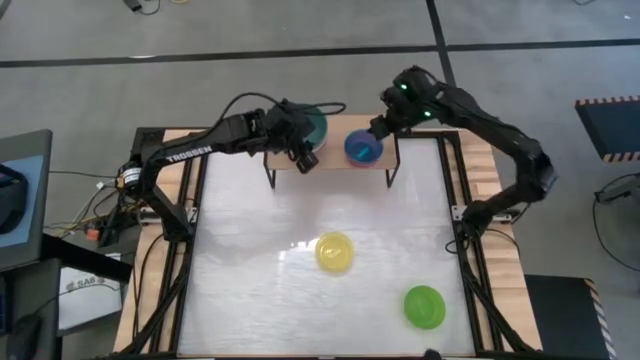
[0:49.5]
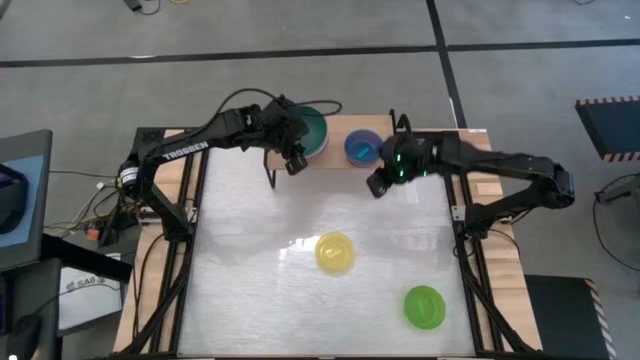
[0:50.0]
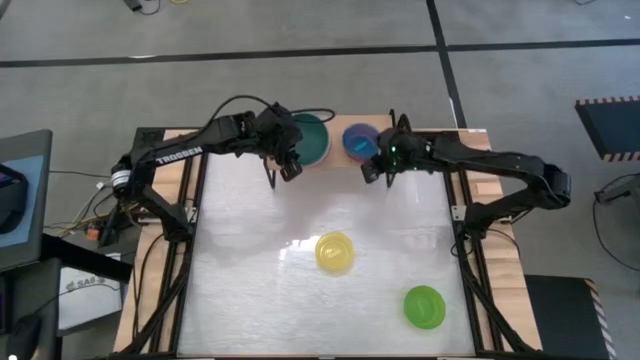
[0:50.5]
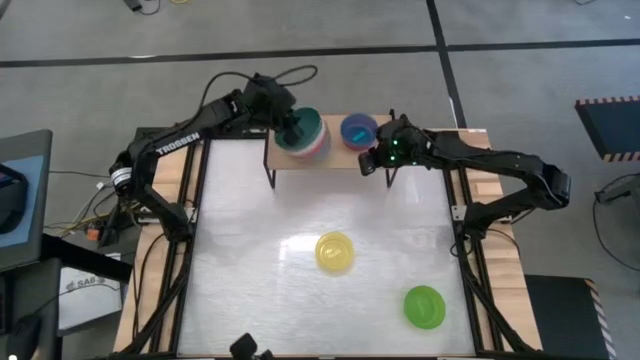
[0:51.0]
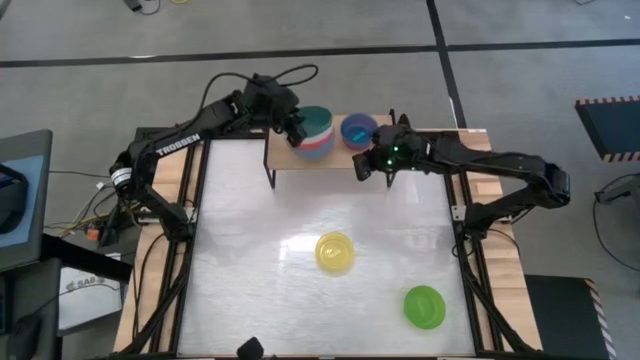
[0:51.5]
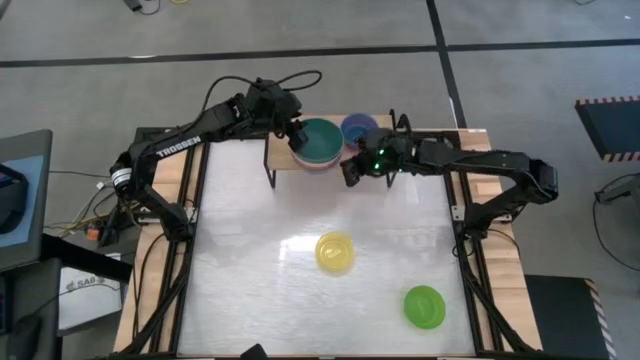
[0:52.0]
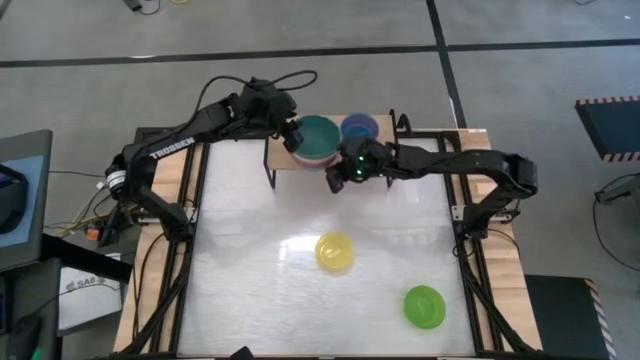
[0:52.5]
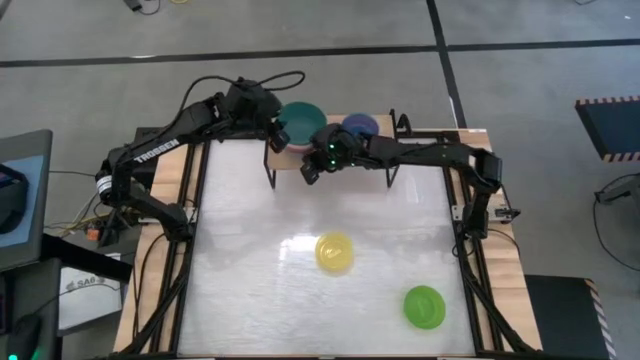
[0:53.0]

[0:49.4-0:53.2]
Task: Place and stack bowls onto a shelf
Adjust the stacked bowls on the shelf

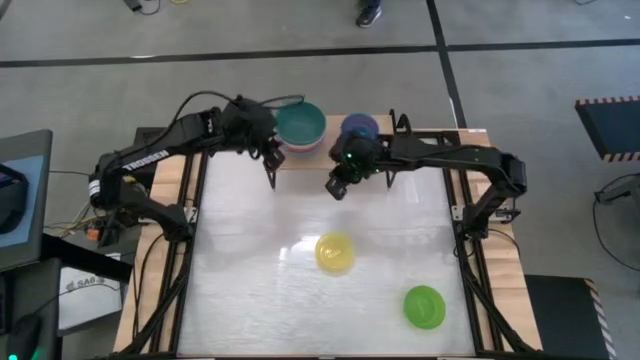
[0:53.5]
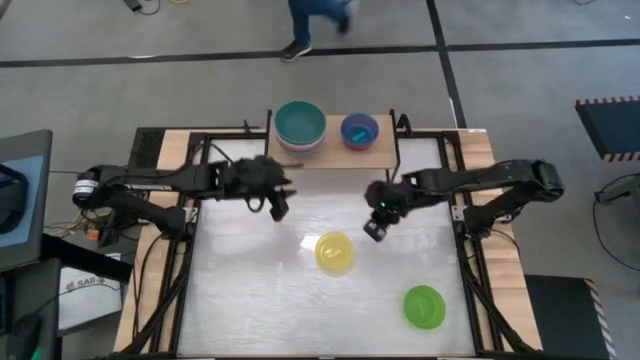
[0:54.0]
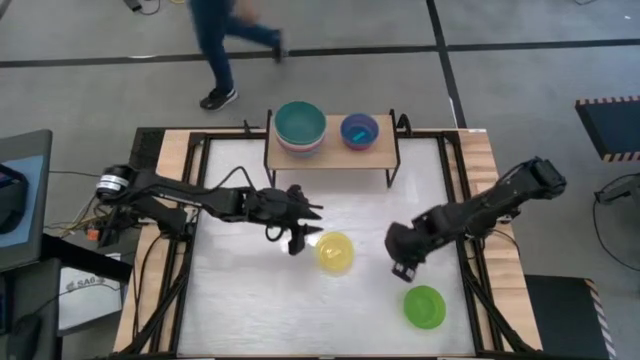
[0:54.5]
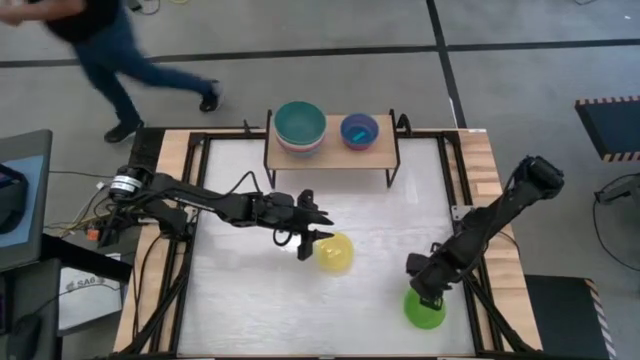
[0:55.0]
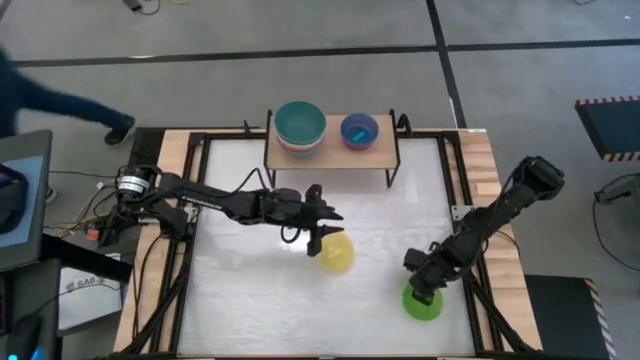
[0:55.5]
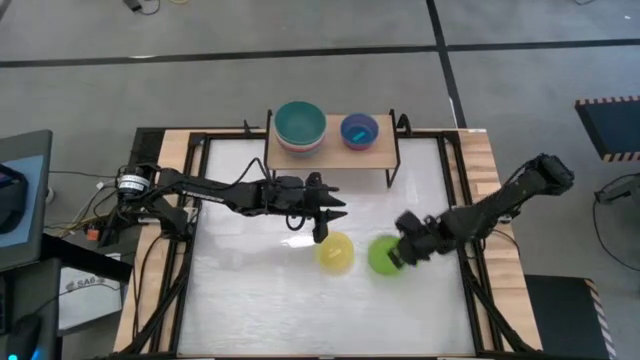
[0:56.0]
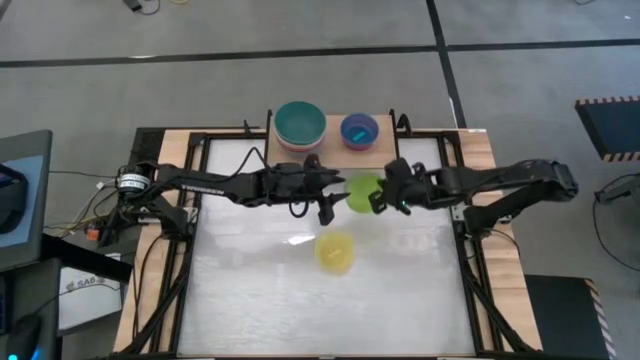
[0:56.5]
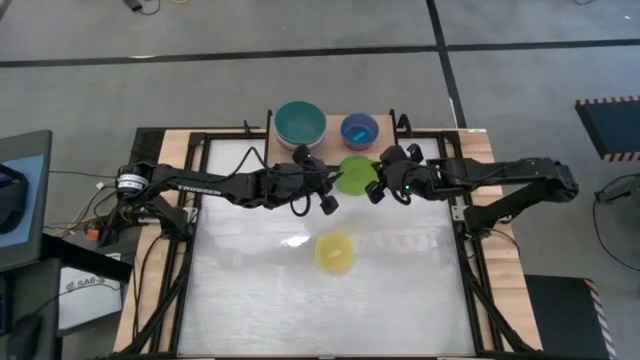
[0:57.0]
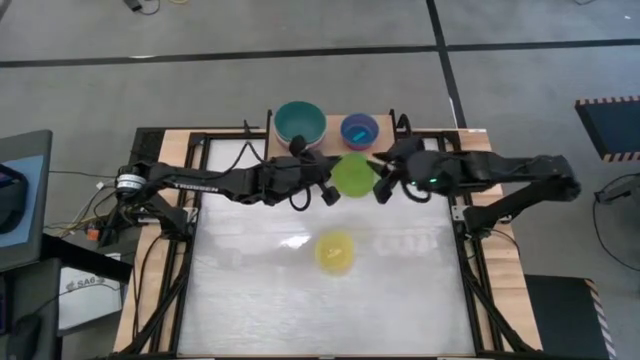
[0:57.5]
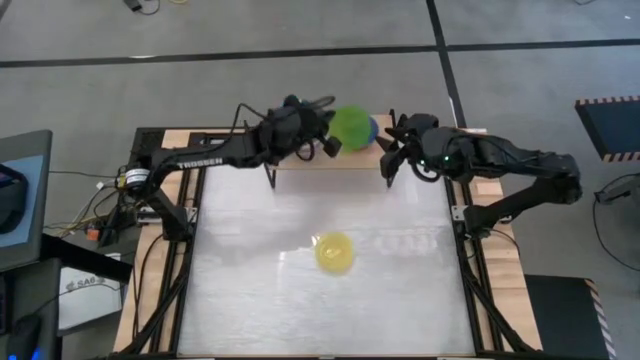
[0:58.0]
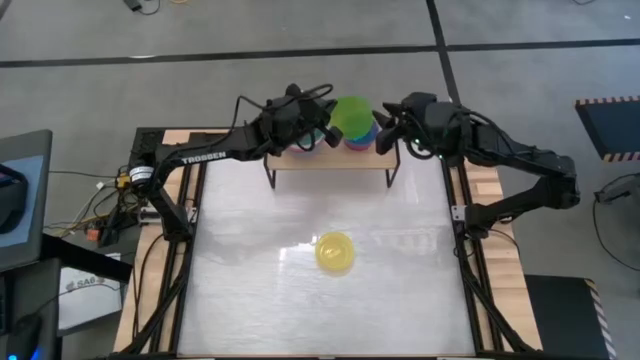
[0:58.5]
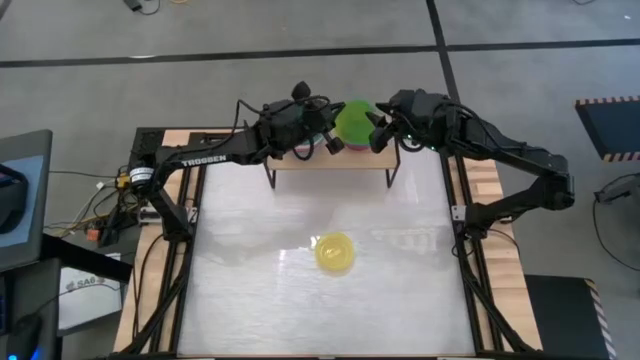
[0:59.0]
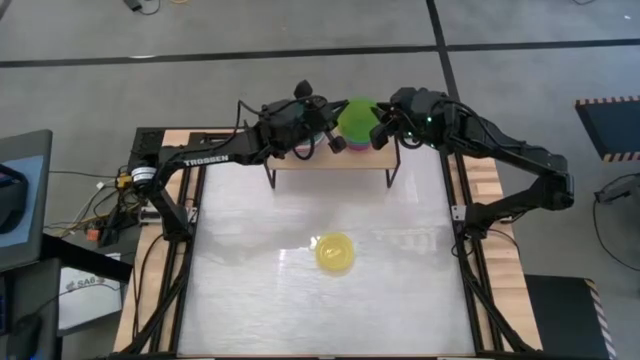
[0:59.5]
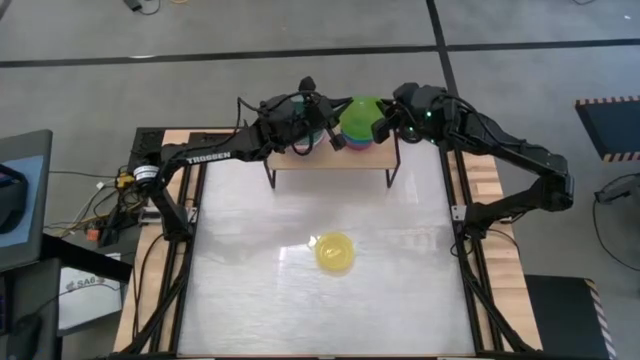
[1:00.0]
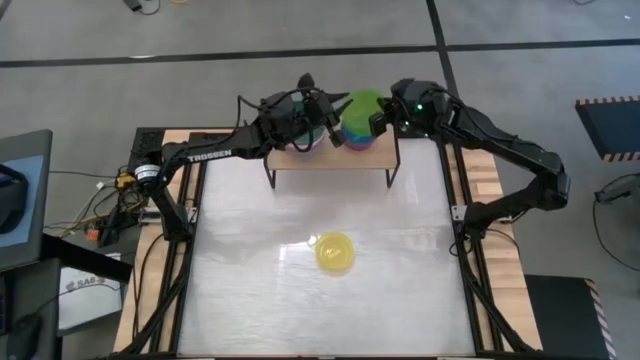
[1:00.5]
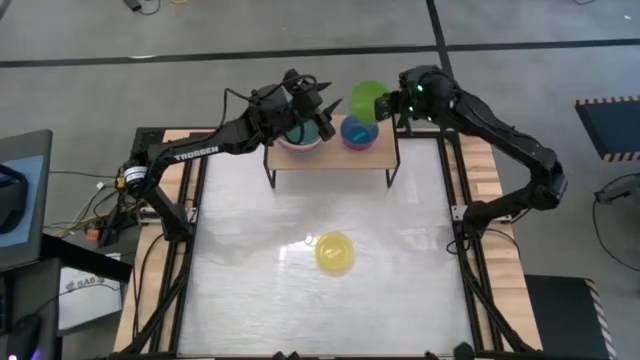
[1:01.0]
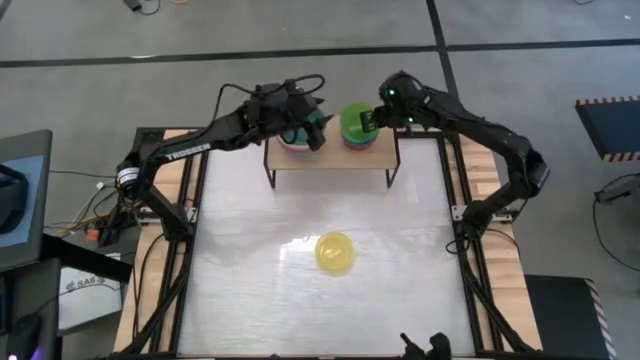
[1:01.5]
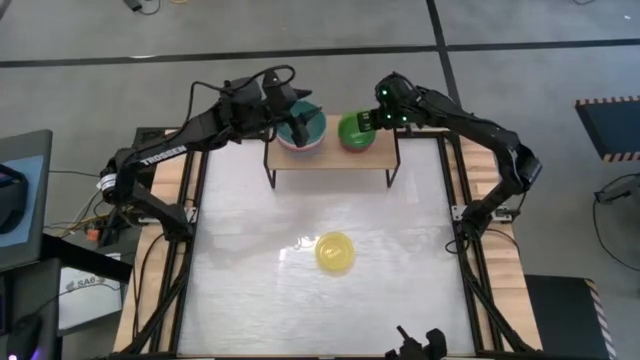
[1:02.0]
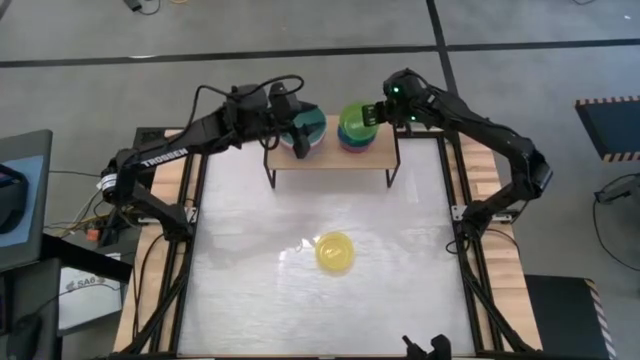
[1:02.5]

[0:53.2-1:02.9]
Stack the green bowl on top of the light blue bowl on the shelf

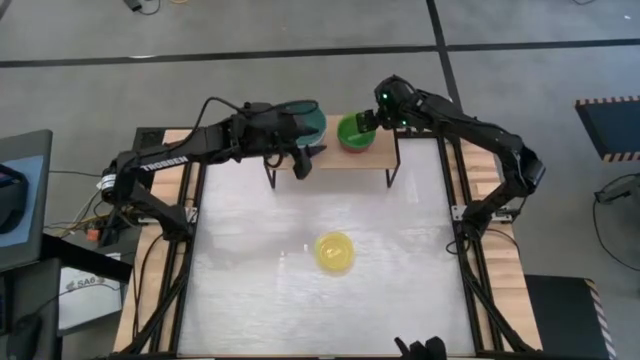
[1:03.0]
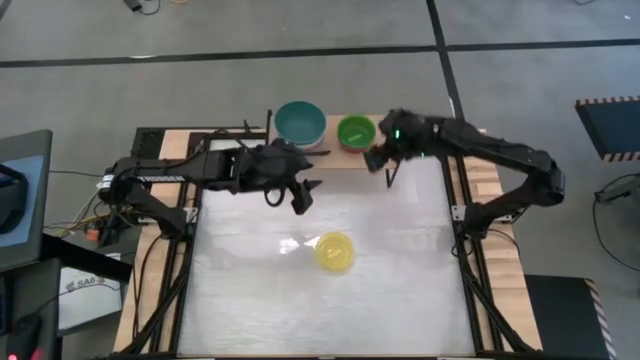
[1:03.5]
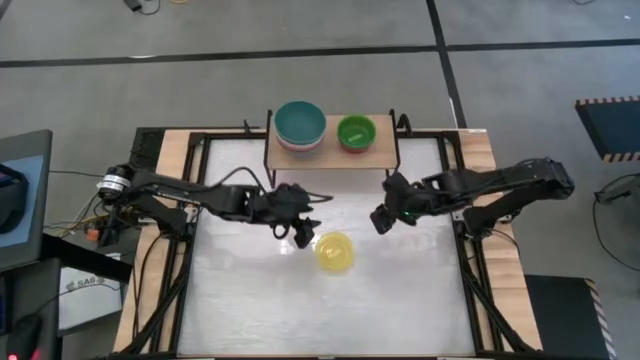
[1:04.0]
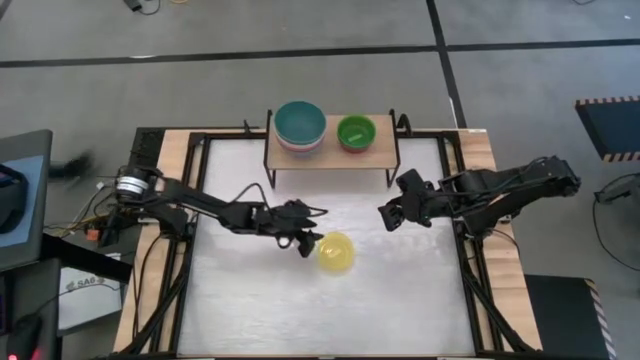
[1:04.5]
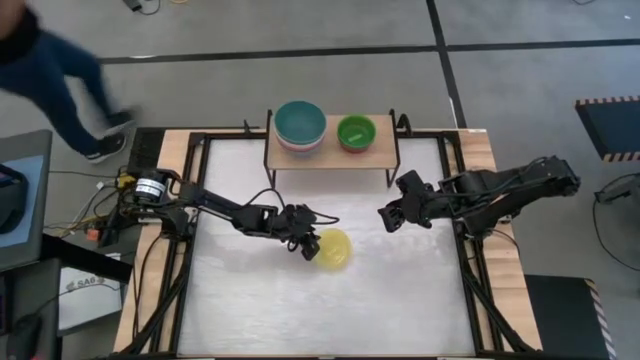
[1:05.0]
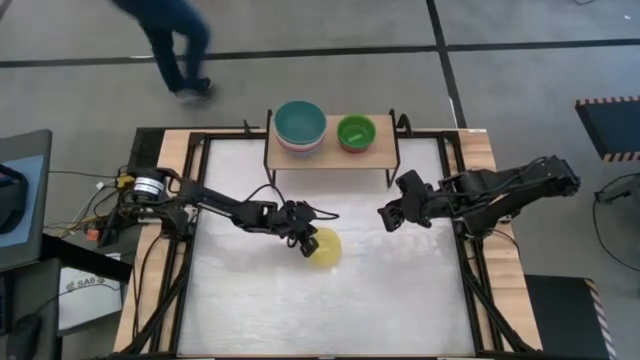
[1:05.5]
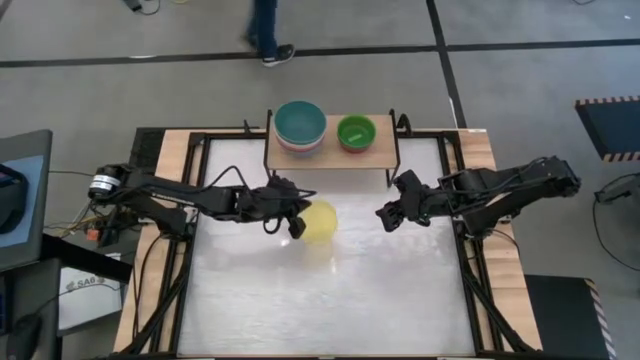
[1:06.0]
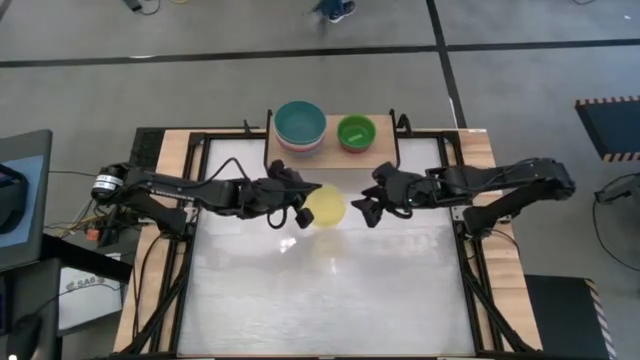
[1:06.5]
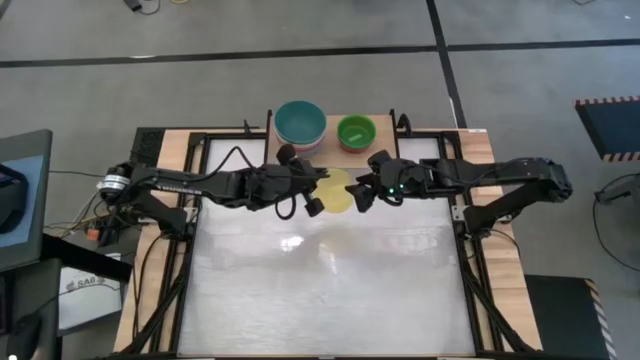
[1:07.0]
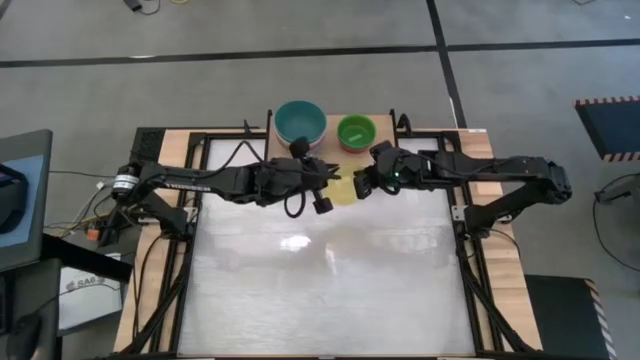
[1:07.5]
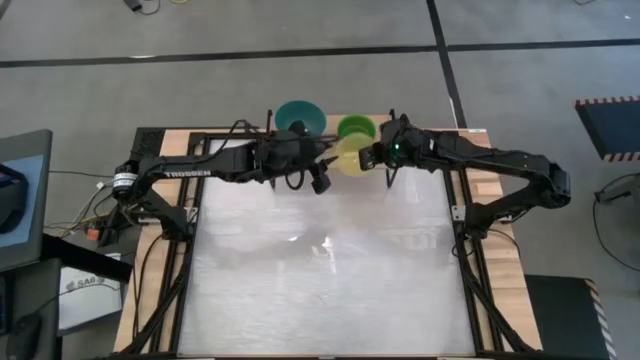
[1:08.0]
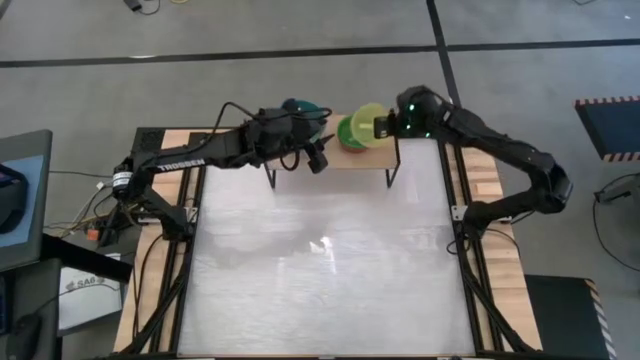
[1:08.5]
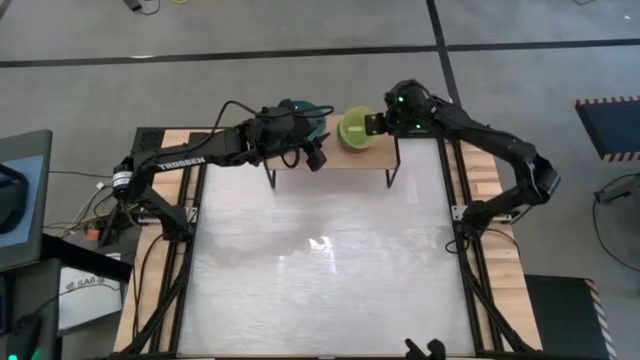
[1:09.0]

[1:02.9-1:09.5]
Stack the yellow bowl on top of the green bowl on the shelf

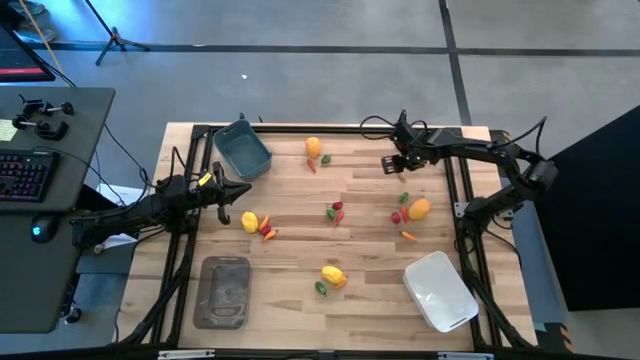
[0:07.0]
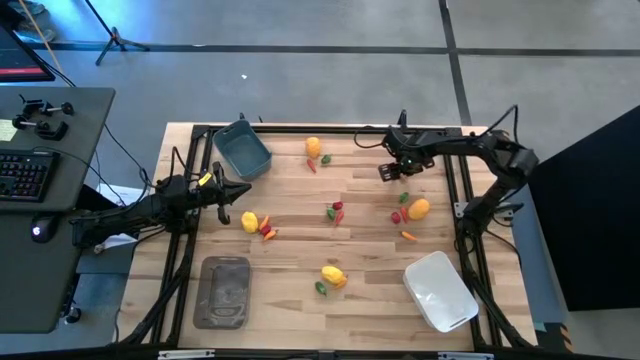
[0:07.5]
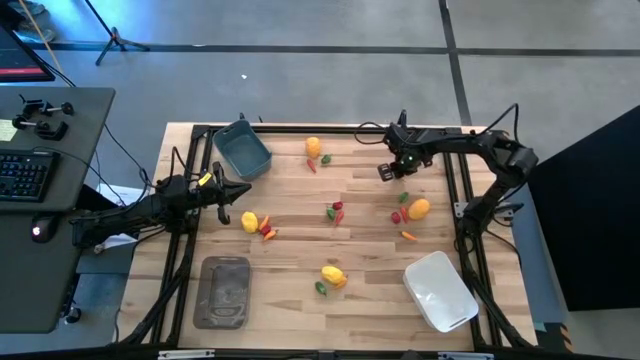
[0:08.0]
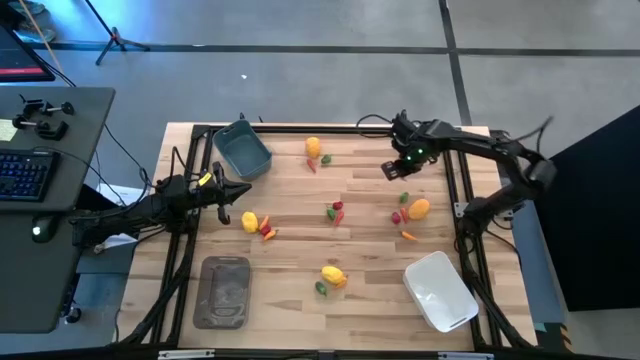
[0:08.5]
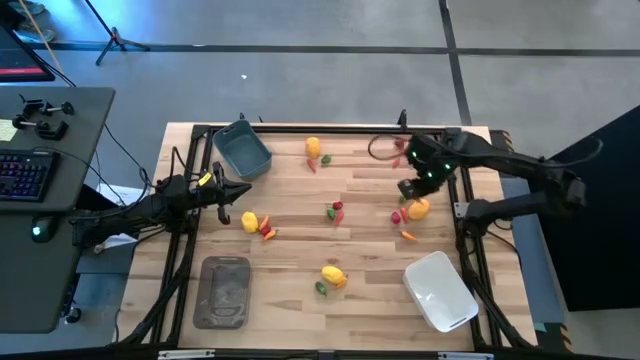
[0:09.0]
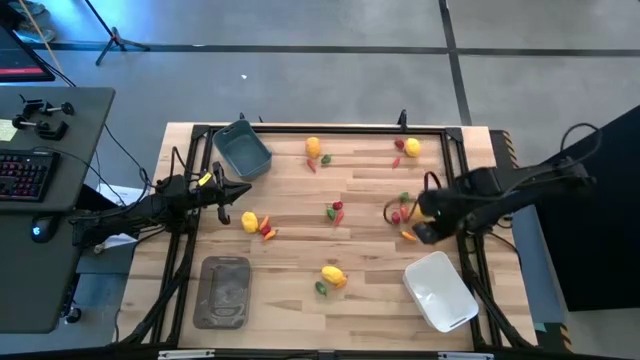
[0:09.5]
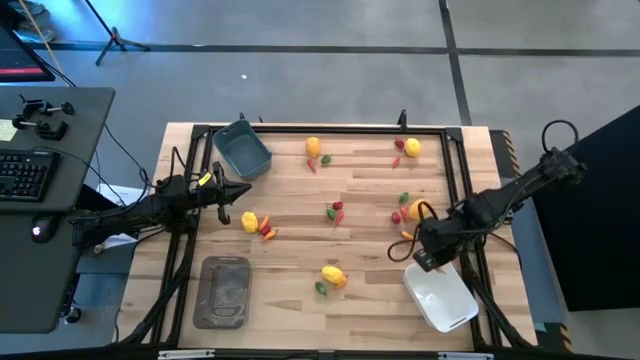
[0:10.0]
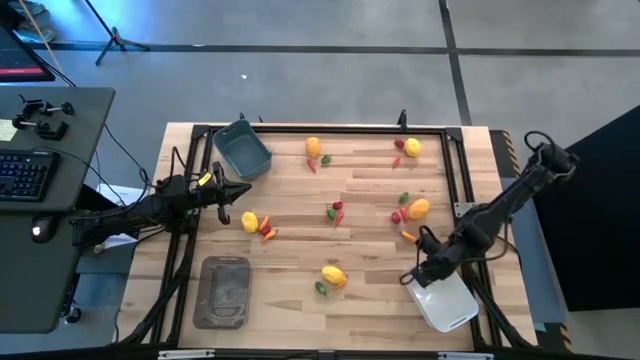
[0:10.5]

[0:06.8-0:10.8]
Task: Sort produce into baskets
Put the light orange chilli pepper into the white bin
